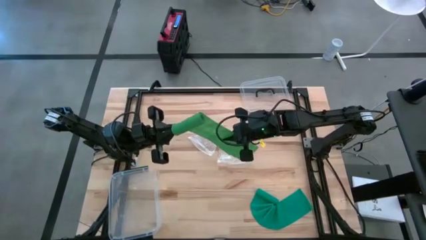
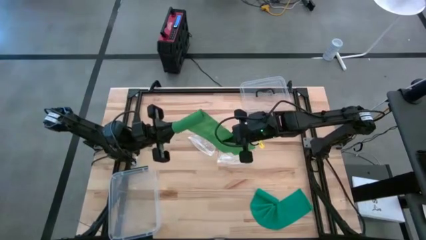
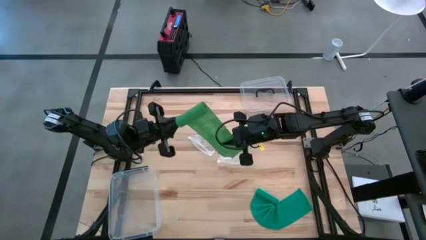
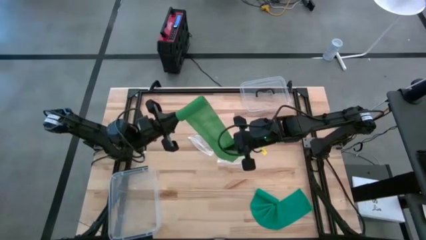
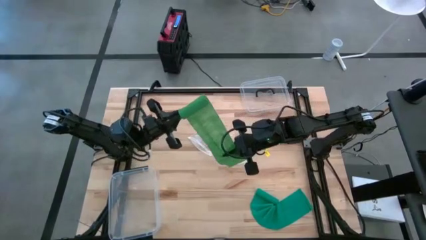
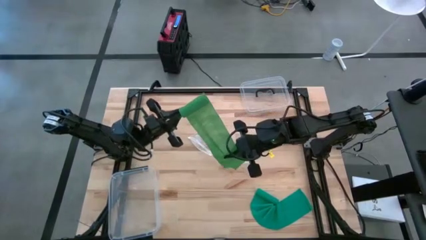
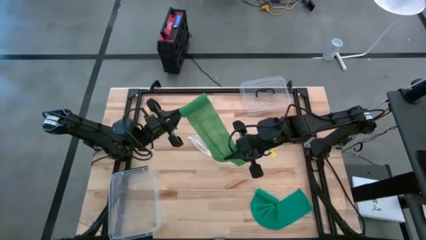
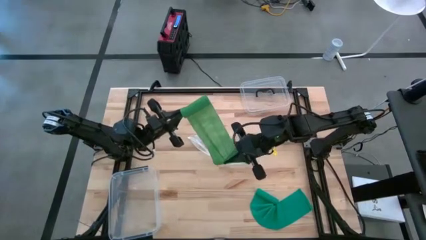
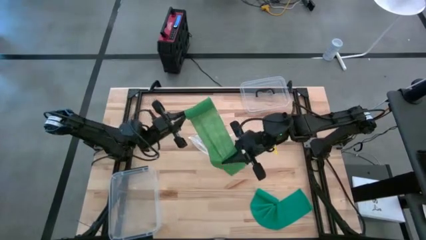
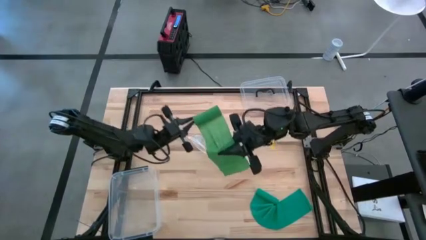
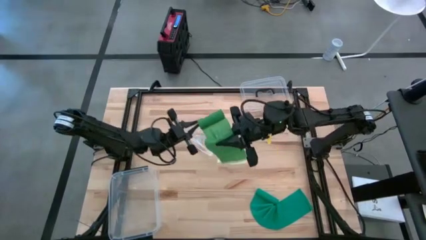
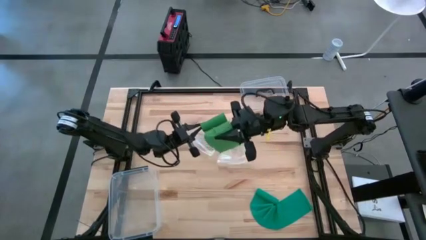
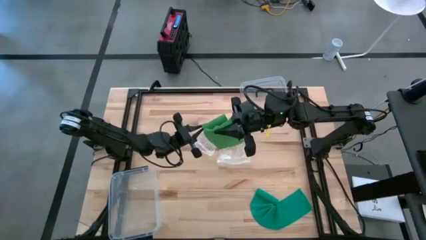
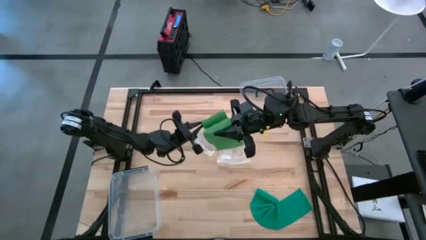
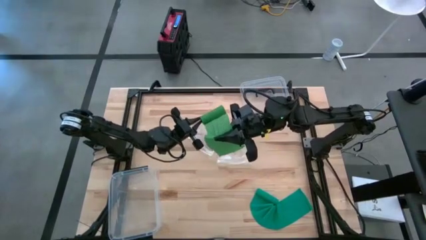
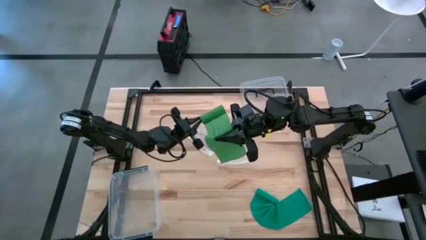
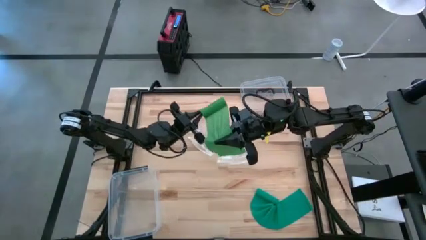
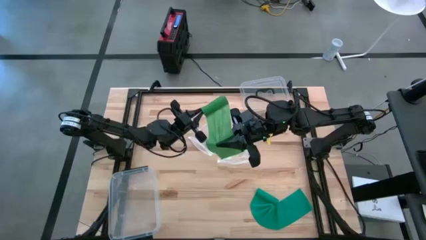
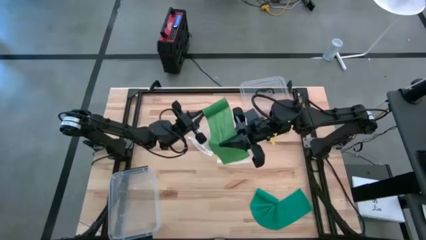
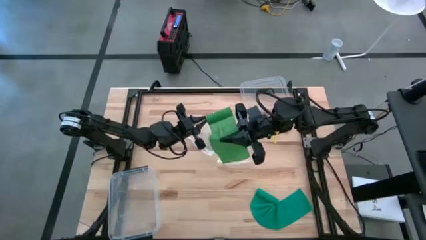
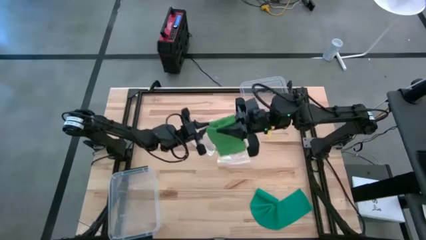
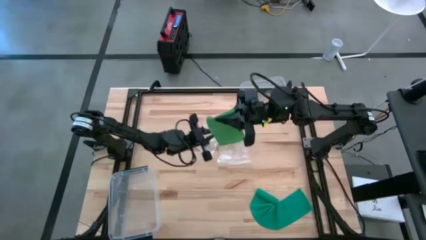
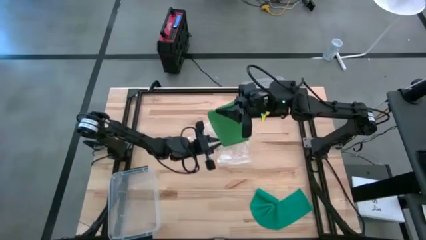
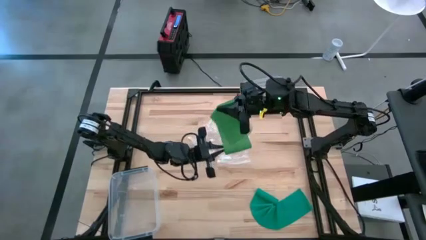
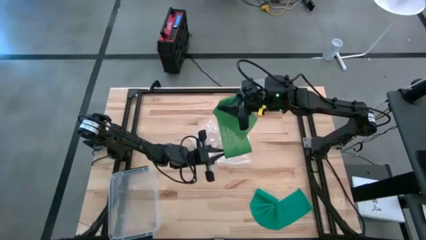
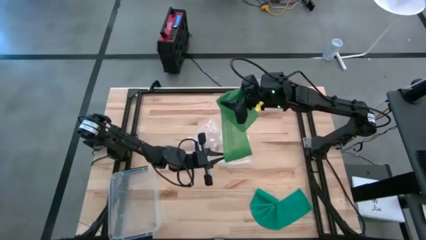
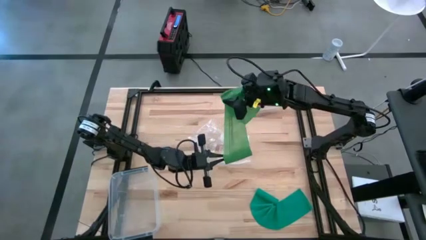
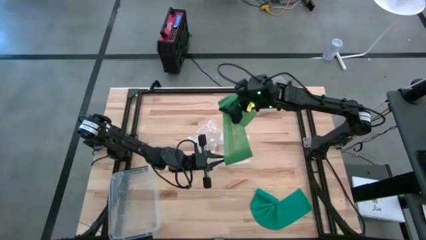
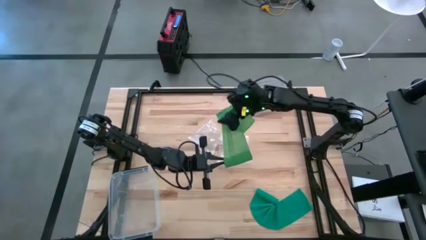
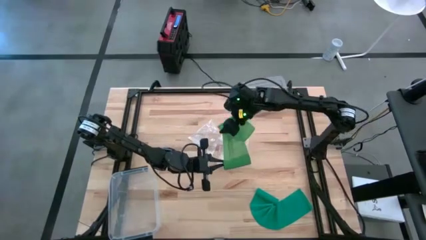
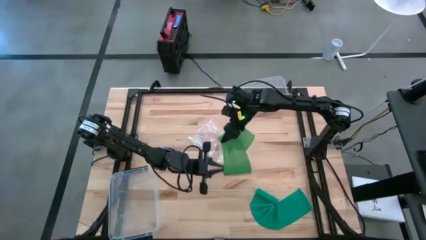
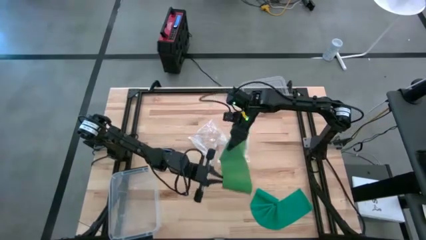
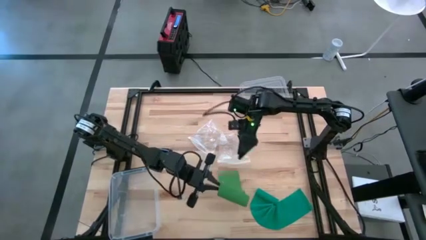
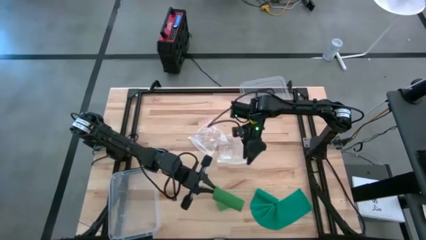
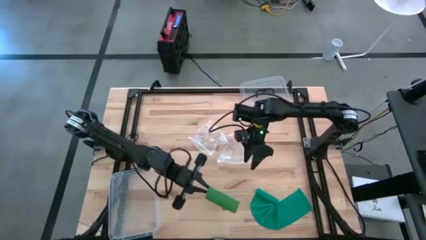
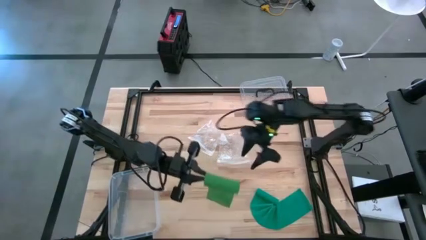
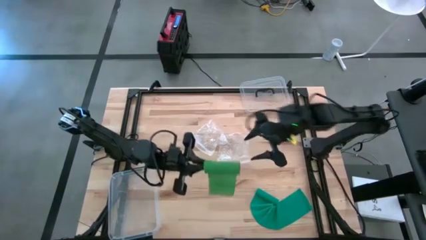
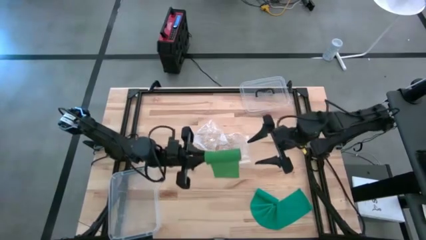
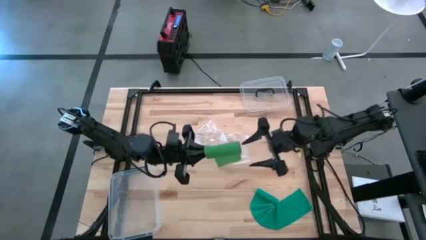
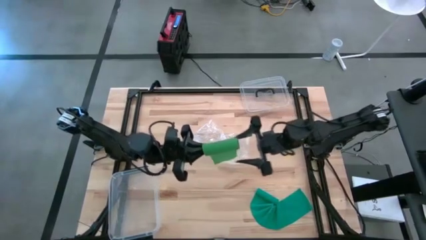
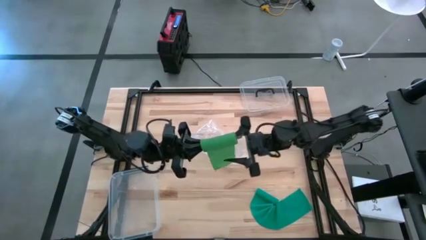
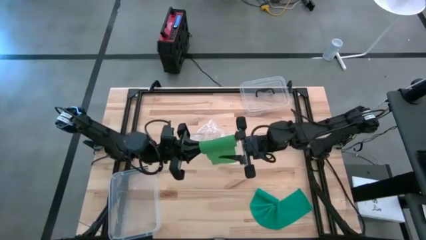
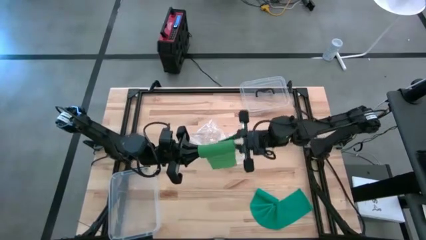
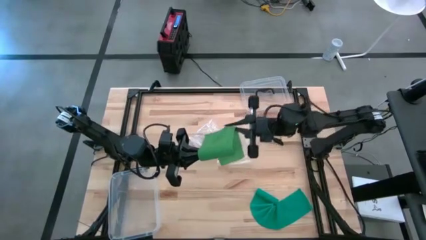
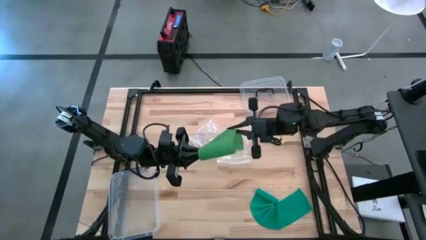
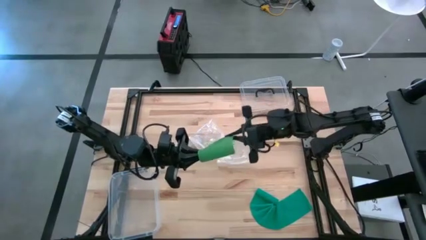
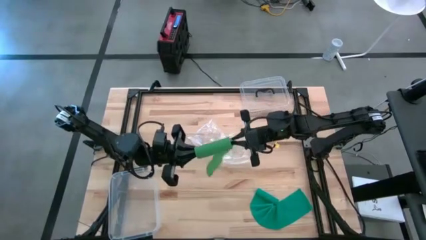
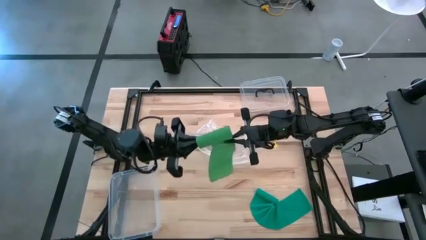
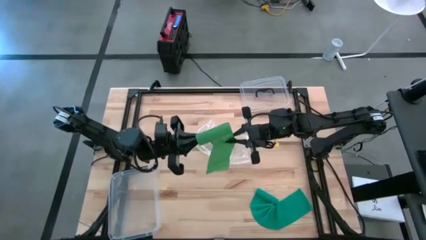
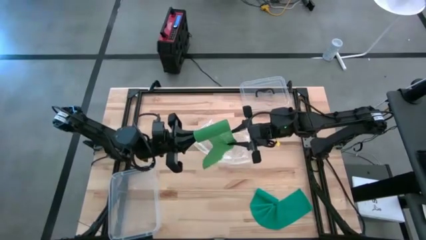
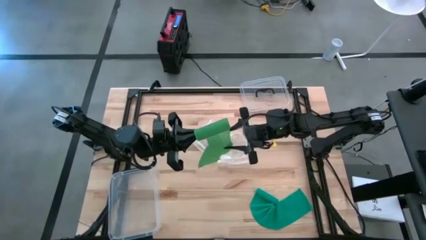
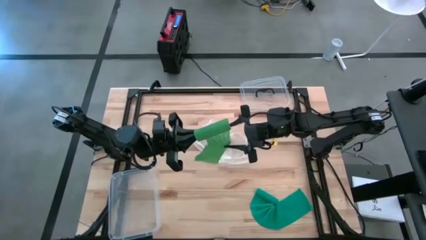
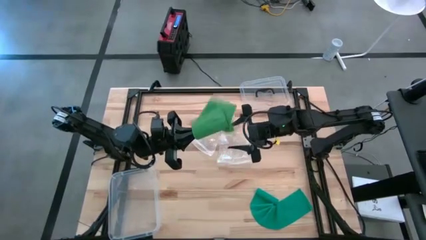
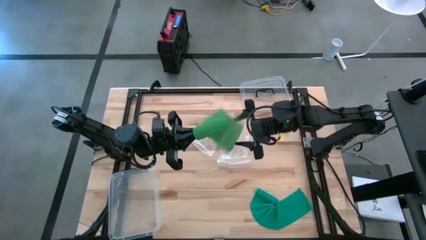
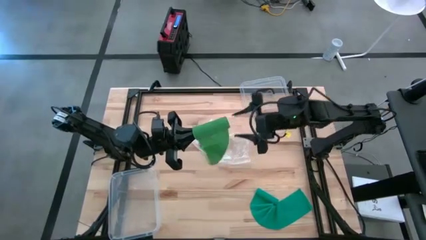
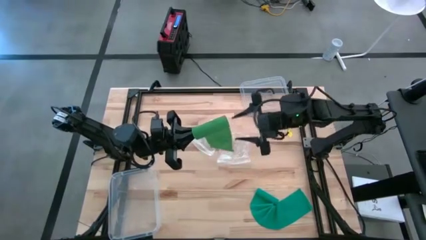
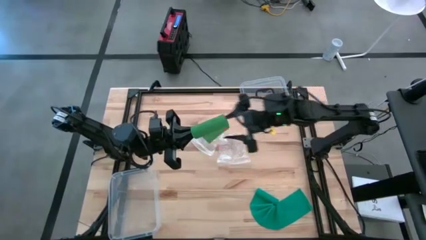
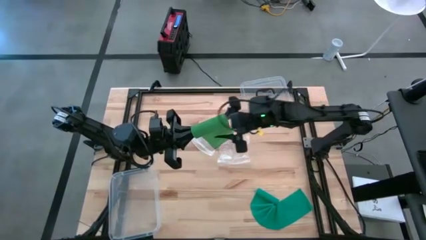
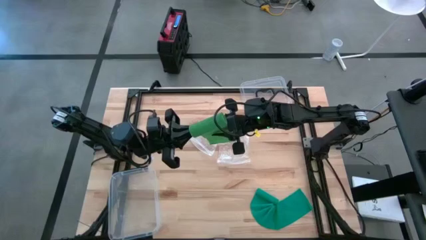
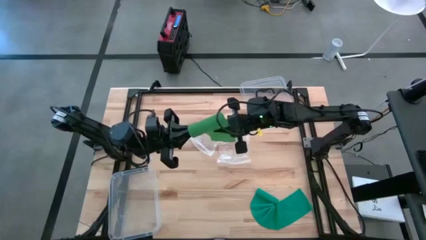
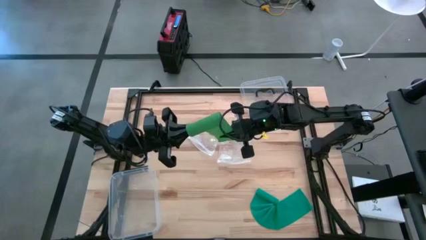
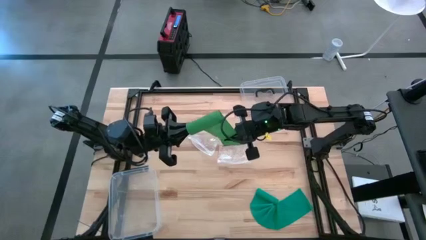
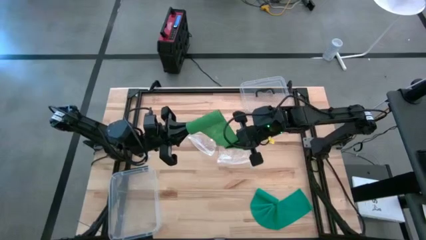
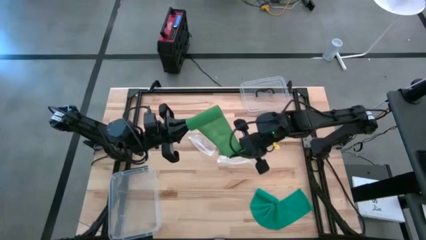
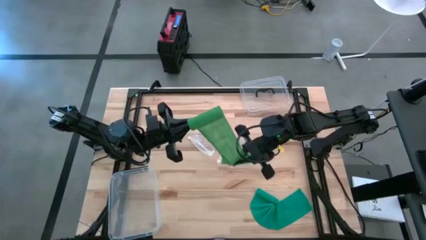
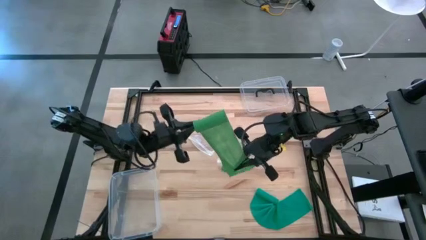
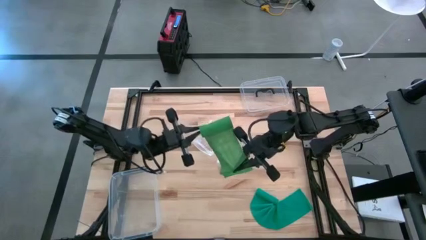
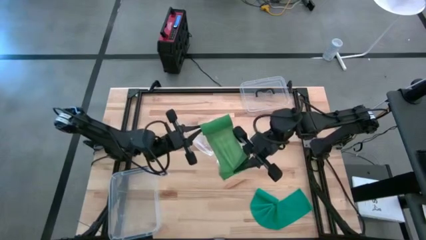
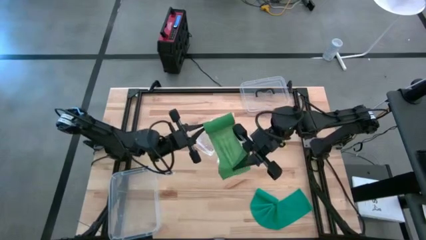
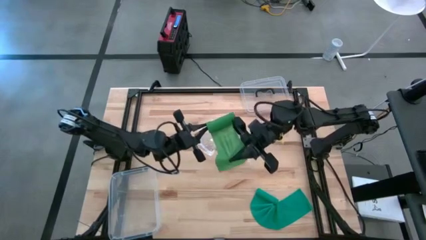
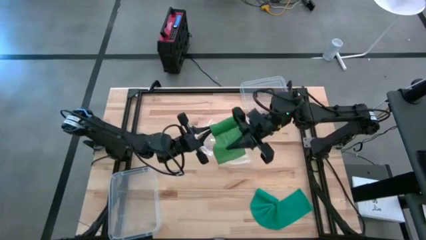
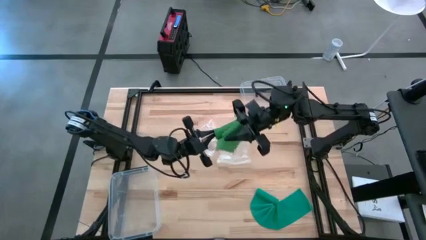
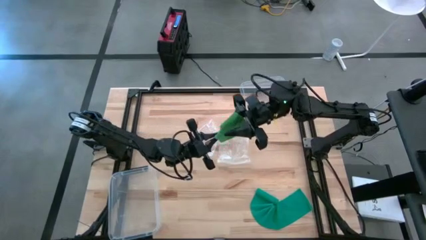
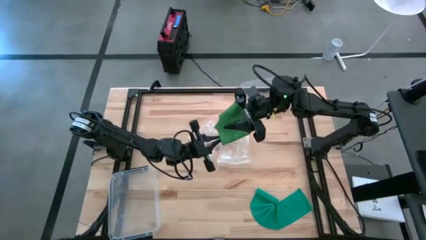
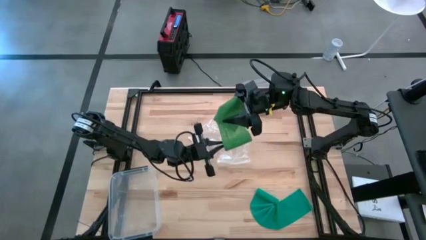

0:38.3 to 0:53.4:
Task: Roll bandage
Roll the green bandage

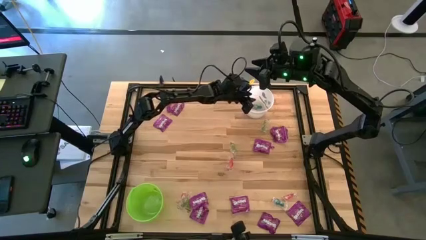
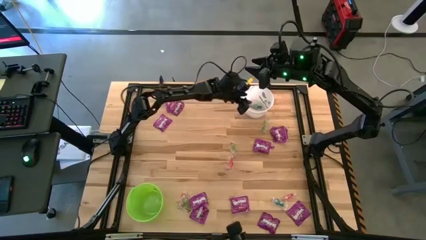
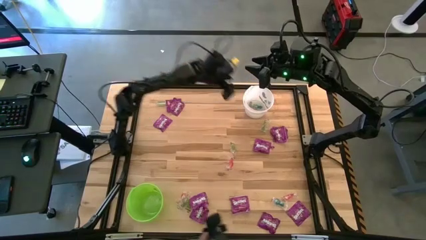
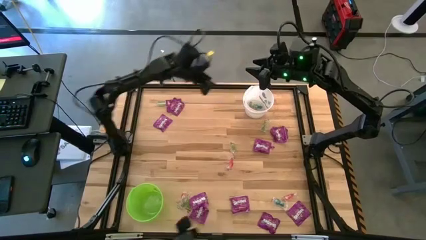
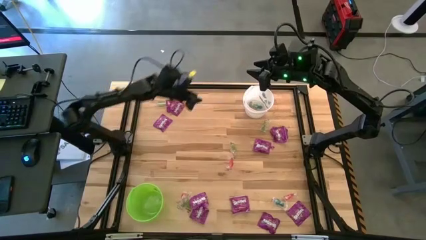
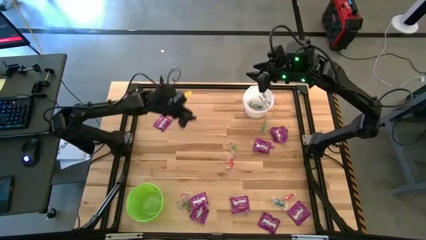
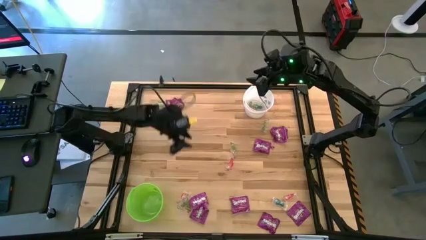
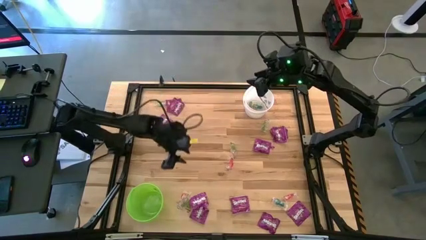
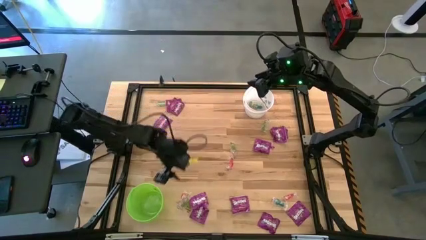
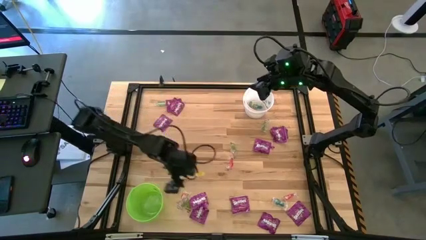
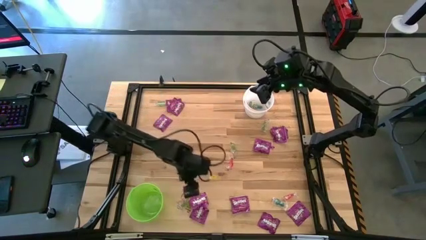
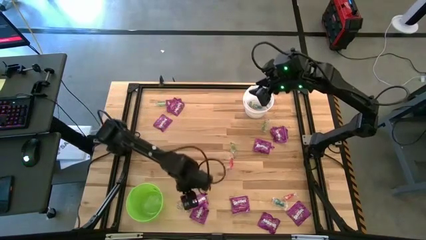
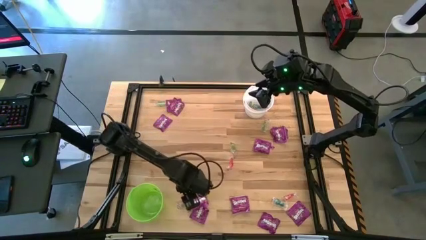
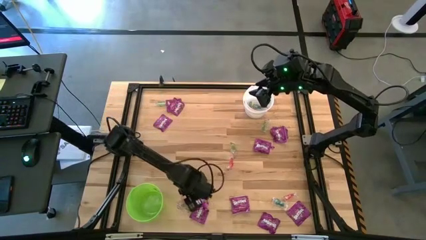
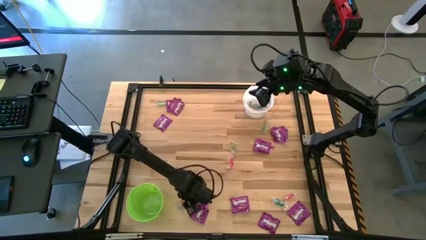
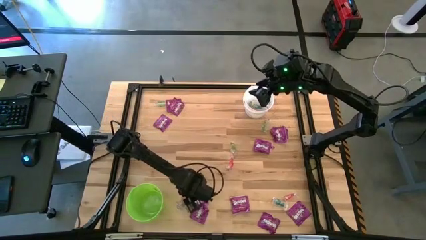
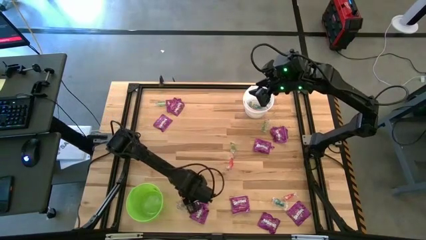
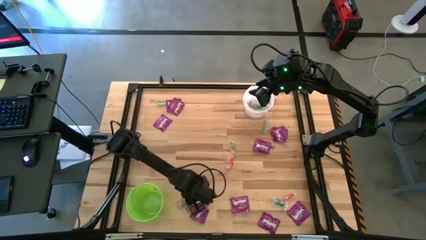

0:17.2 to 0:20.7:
Task: Sort candy by brand, put in halloween buckets
Put the green gummy into the white bucket
